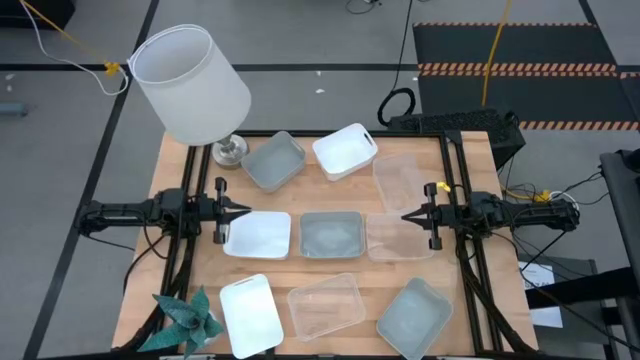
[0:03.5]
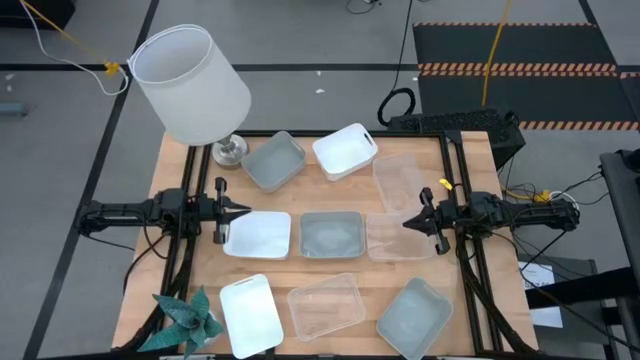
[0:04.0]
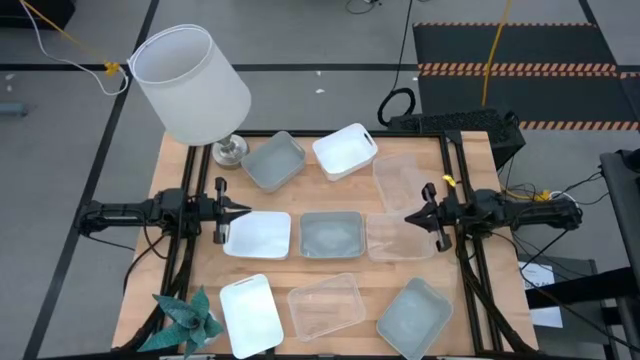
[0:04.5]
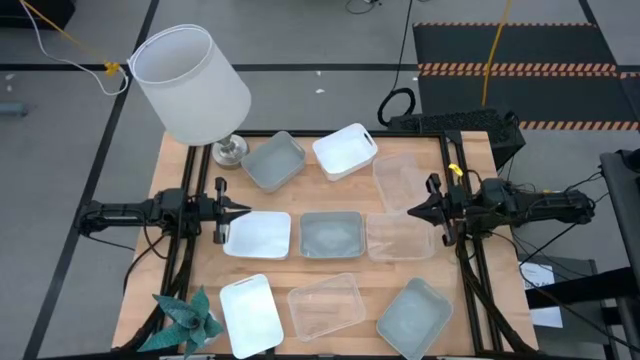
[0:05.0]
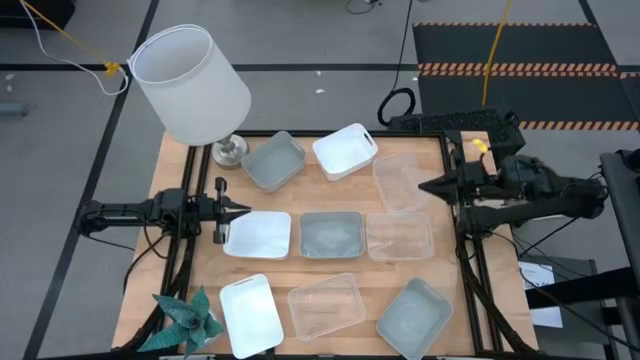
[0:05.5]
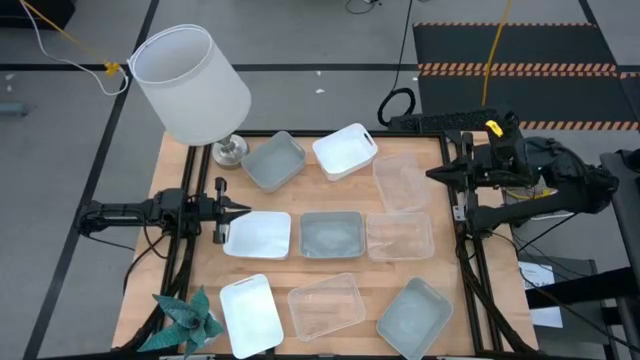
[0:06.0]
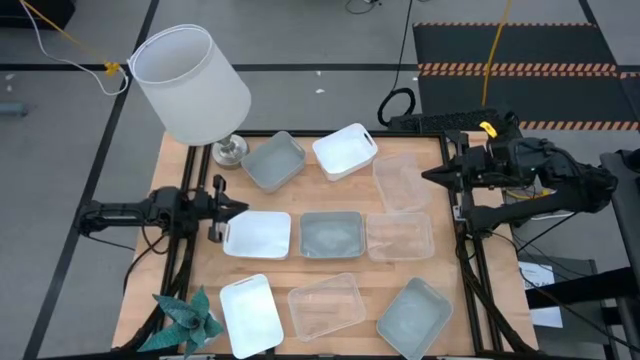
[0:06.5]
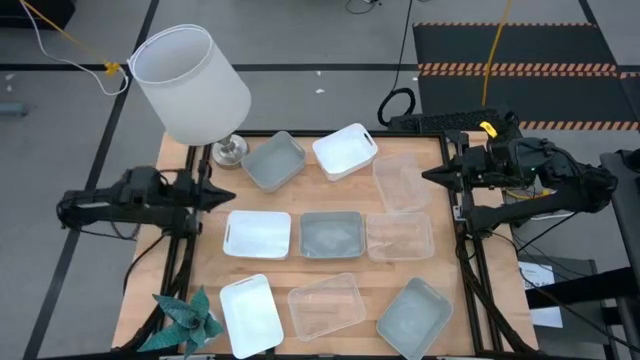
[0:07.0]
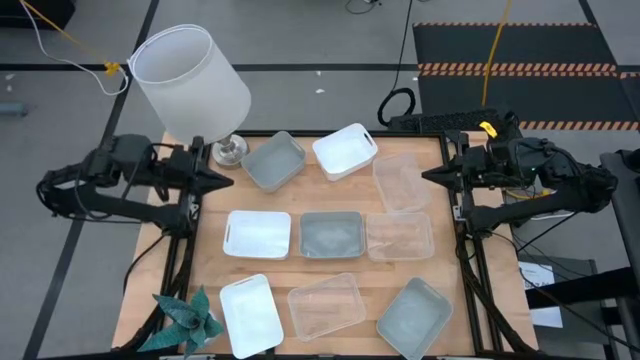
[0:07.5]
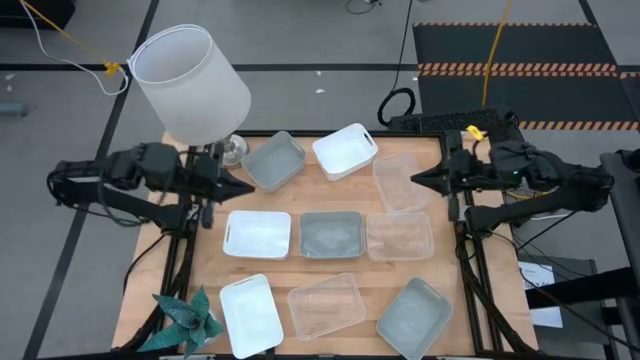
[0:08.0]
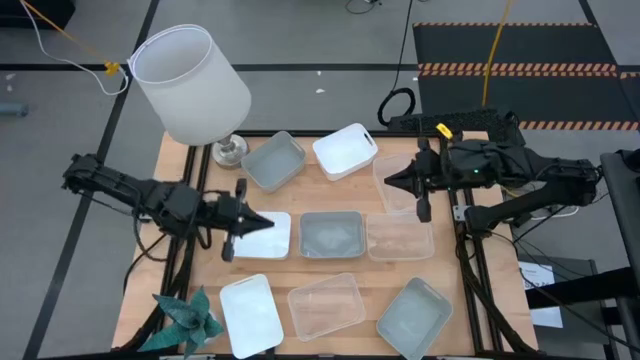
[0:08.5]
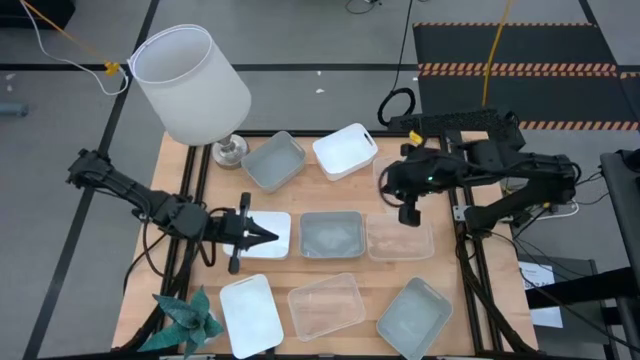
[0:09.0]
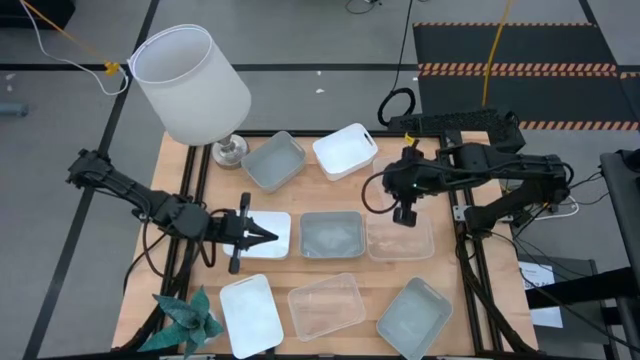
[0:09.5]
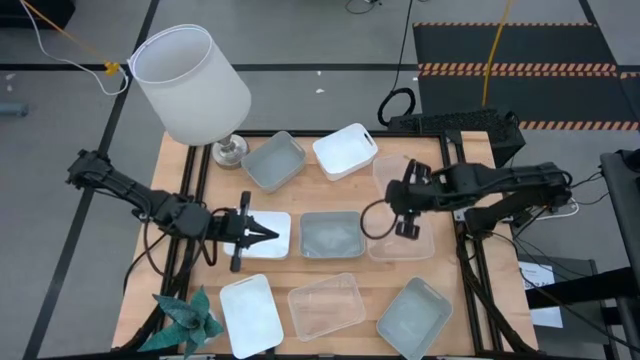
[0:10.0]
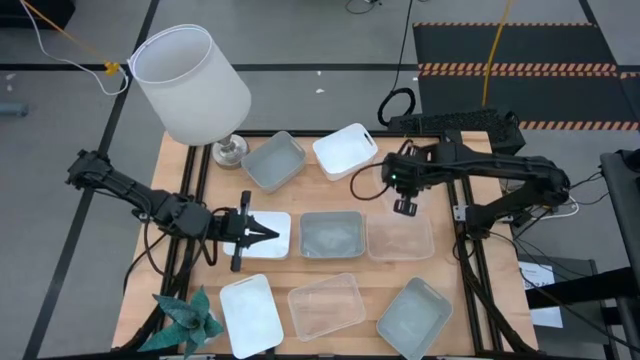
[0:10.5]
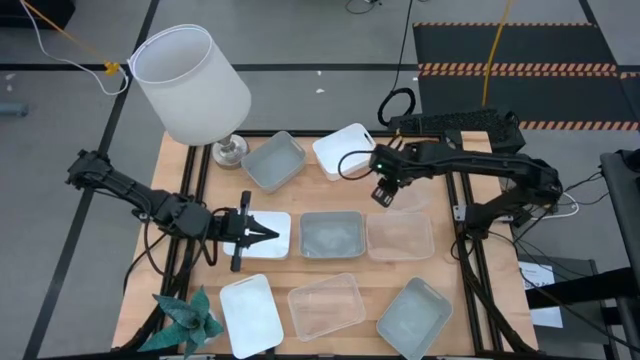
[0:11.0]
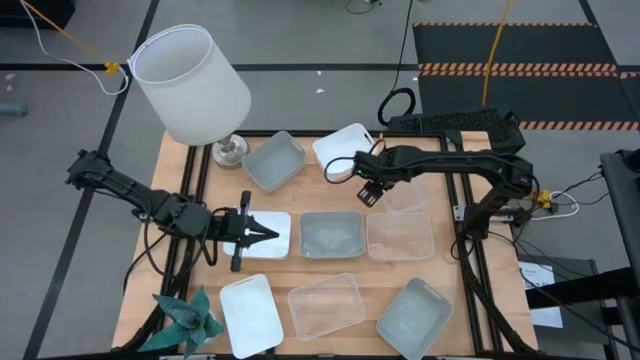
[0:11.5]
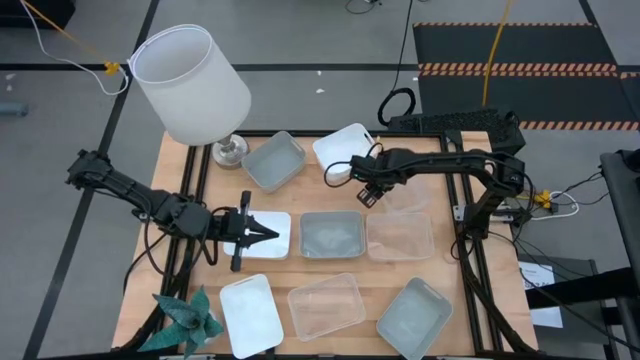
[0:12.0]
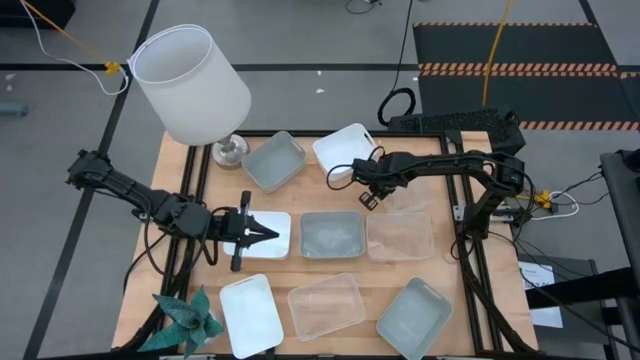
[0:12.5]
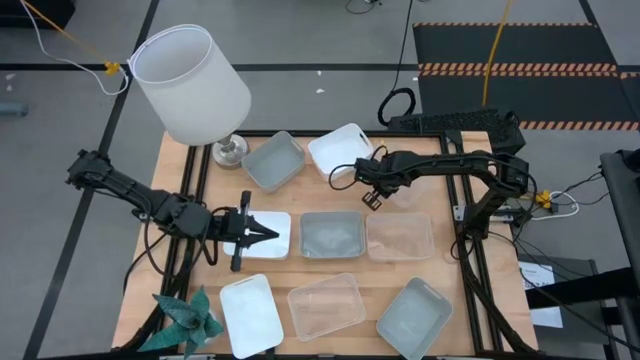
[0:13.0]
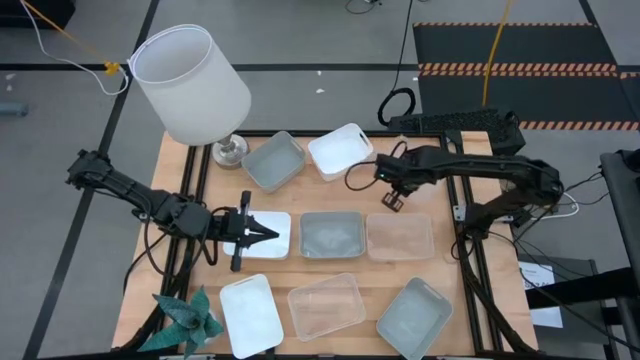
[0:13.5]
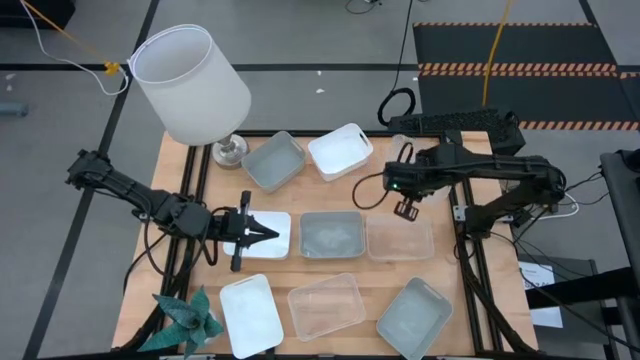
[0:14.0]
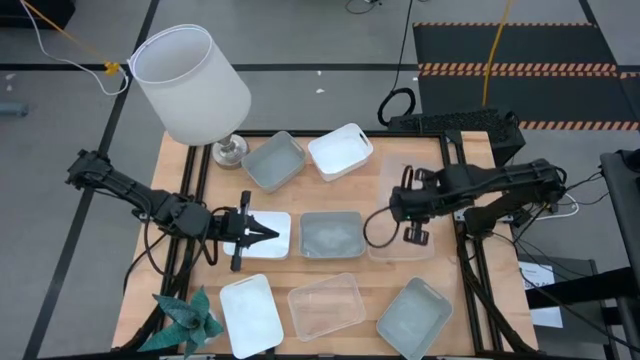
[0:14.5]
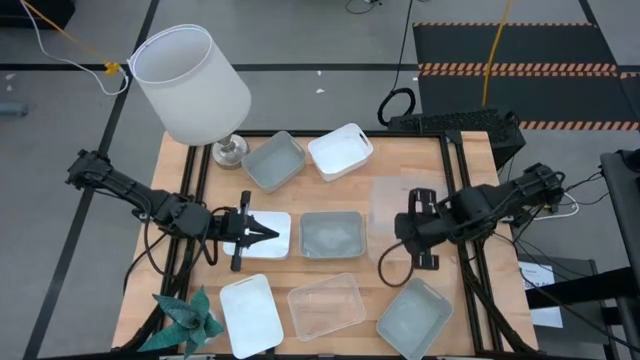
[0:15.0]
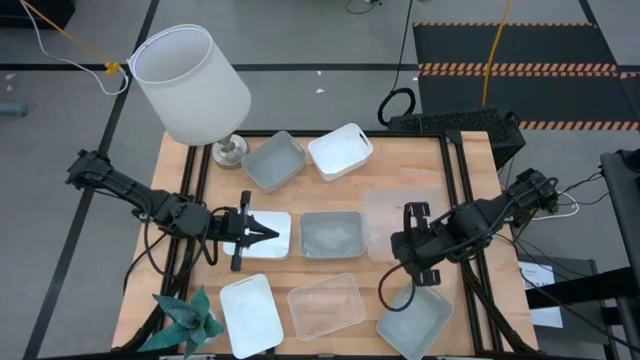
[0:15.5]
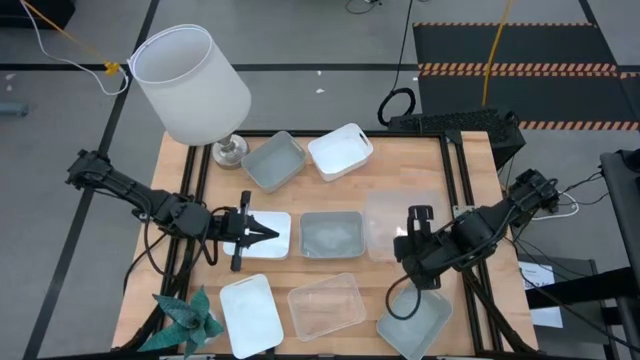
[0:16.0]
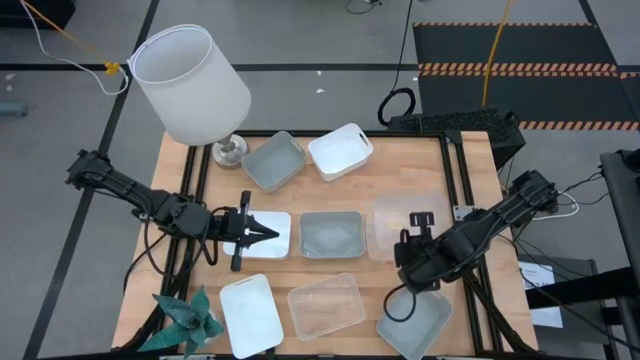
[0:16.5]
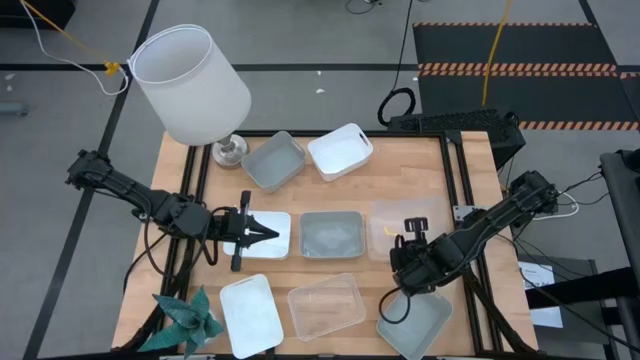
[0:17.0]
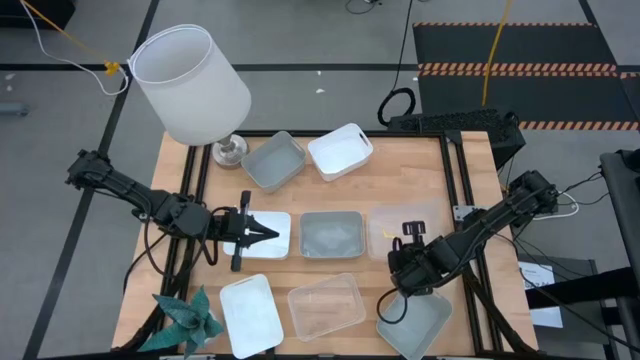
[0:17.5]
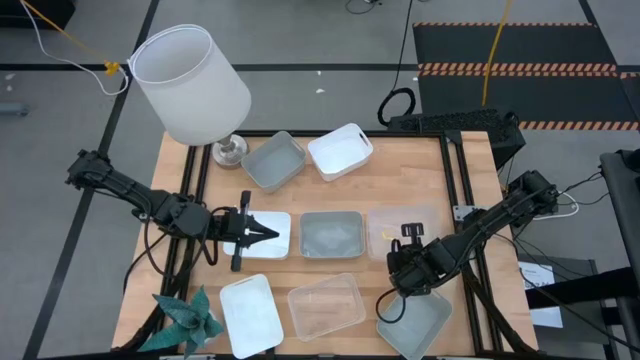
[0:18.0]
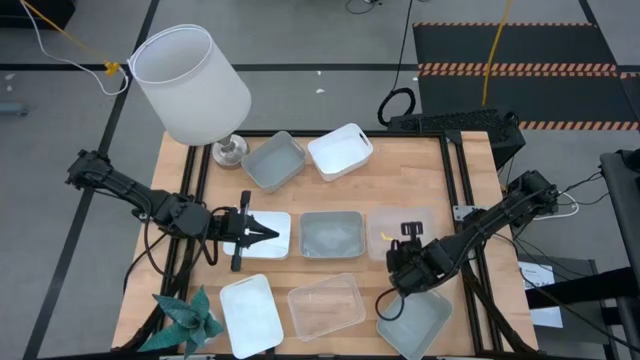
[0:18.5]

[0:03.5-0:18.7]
Stack the top transparent bin on the middle transparent bin

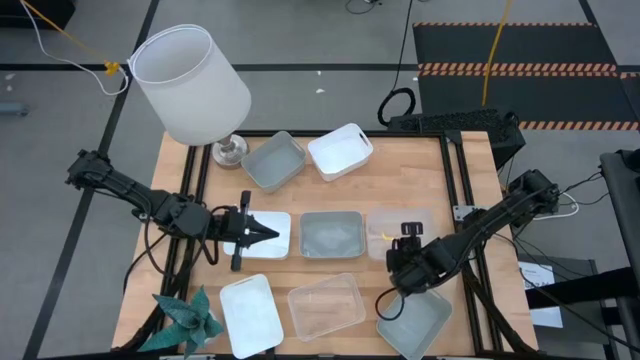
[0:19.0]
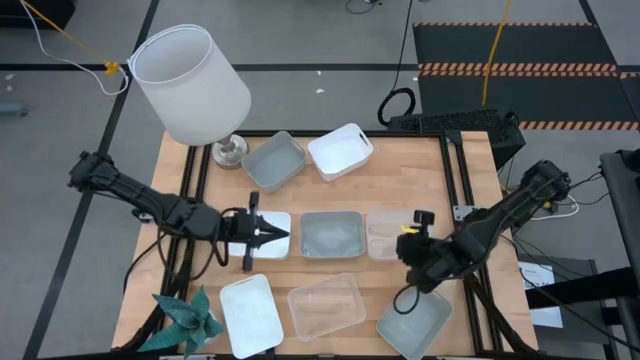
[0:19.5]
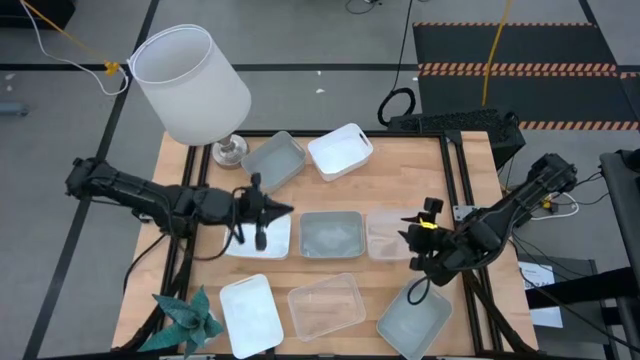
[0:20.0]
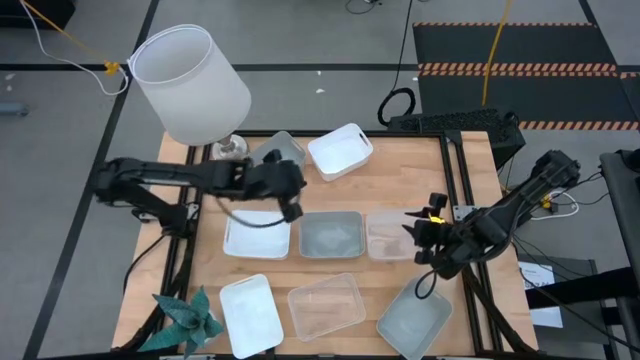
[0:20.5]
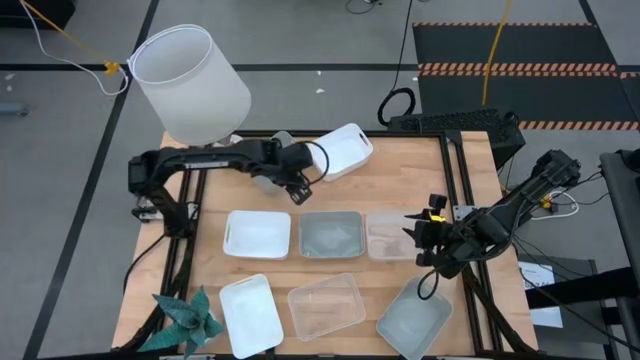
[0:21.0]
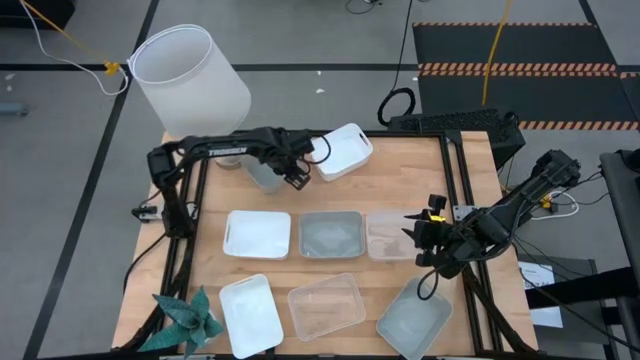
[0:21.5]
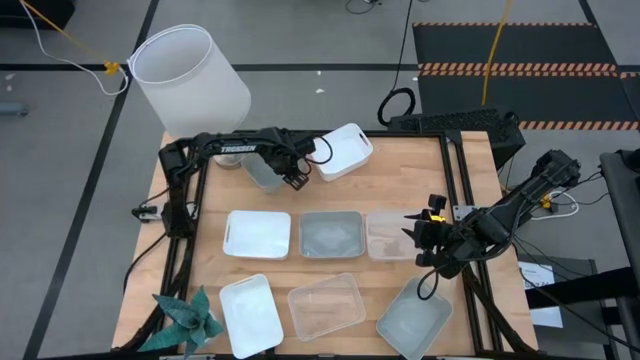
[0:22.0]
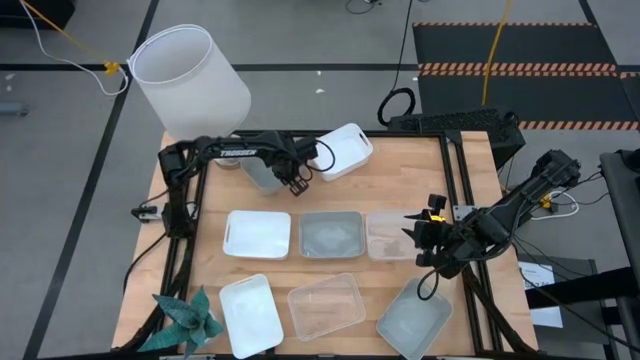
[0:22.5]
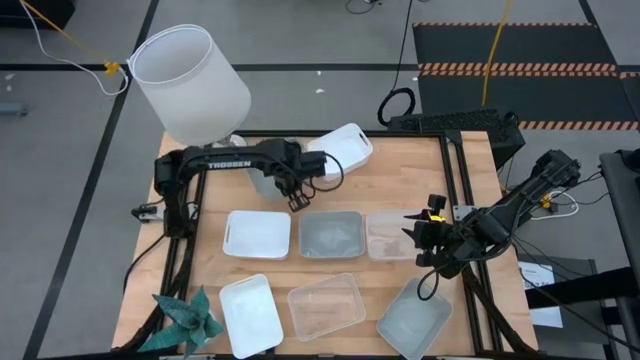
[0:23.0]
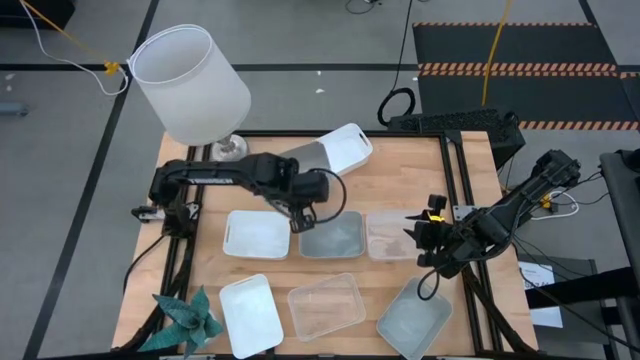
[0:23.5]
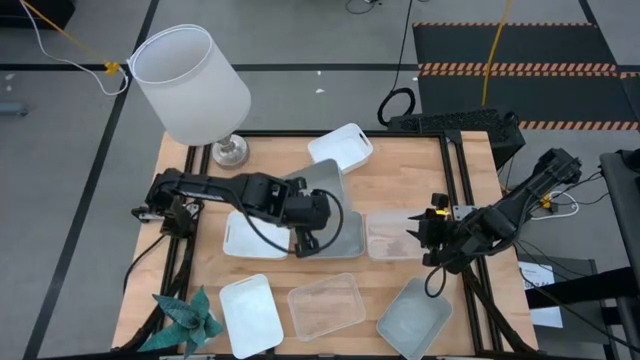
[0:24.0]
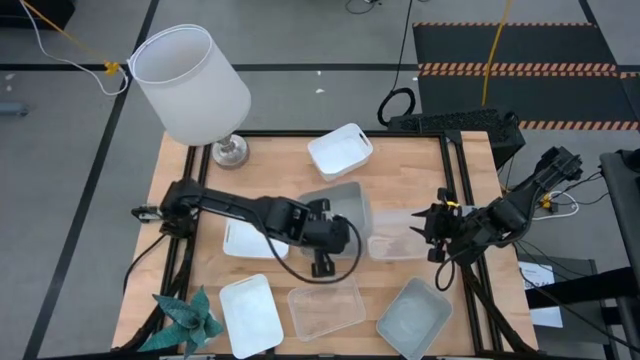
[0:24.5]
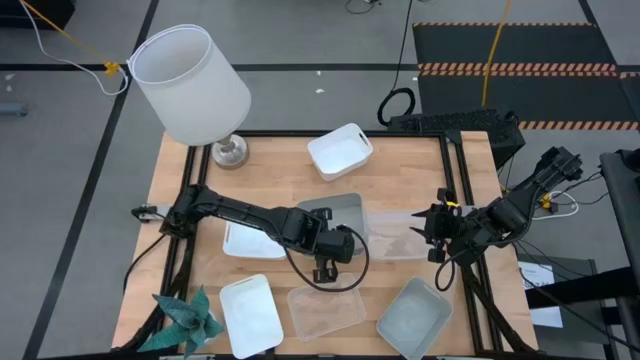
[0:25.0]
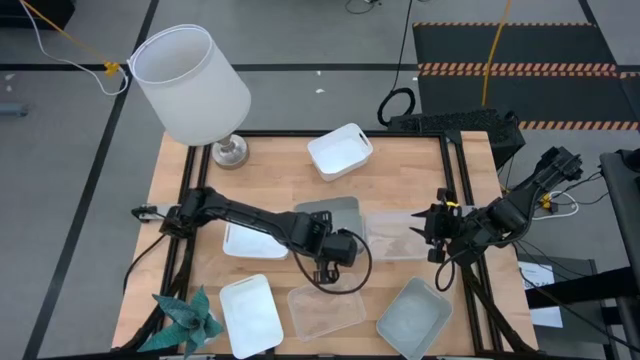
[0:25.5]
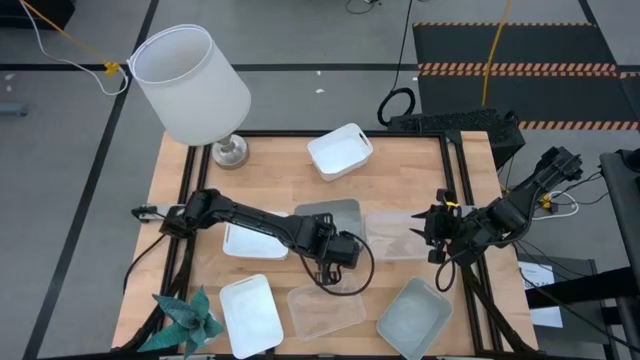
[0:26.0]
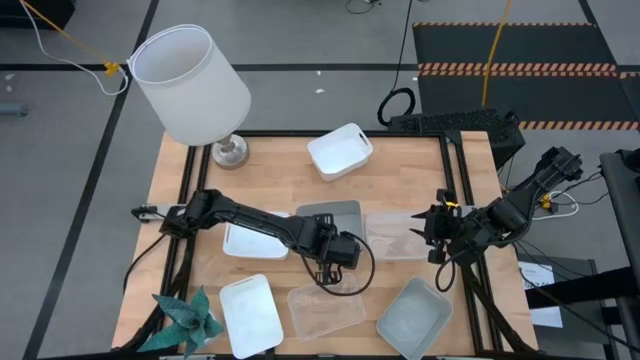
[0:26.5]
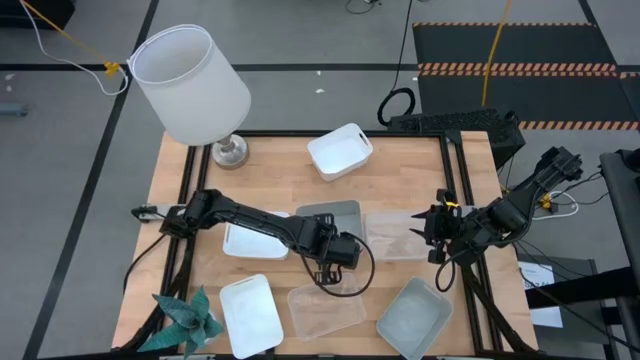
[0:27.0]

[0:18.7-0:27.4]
Stack the top gray bin on the middle gray bin
